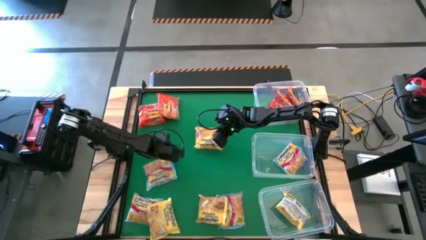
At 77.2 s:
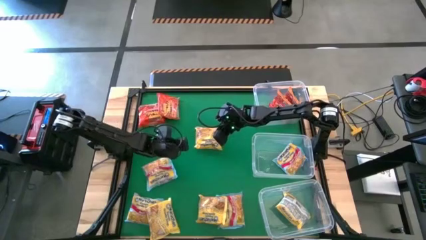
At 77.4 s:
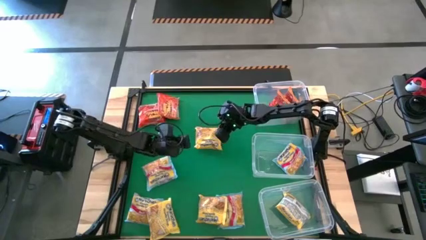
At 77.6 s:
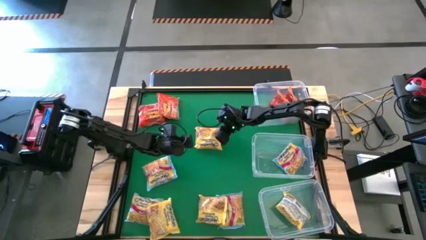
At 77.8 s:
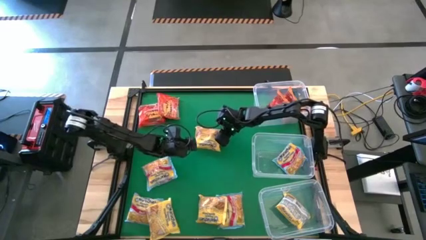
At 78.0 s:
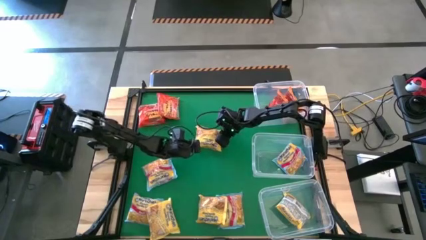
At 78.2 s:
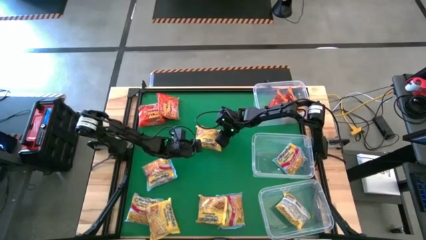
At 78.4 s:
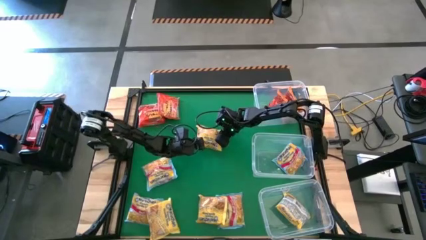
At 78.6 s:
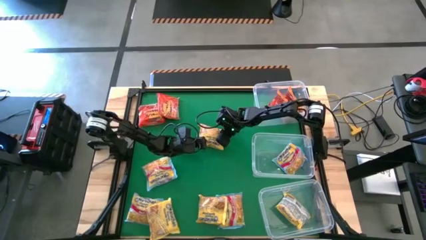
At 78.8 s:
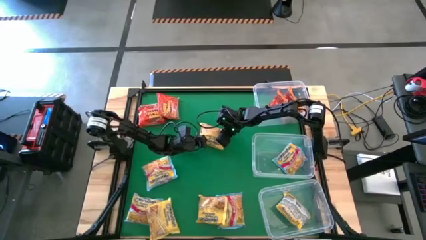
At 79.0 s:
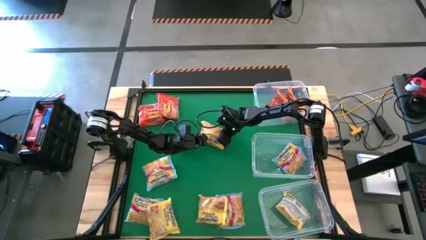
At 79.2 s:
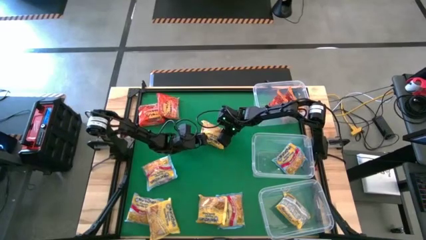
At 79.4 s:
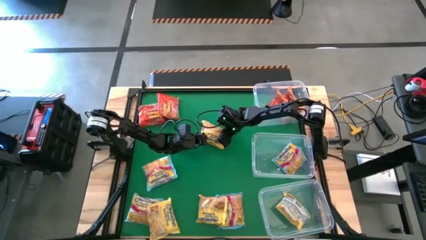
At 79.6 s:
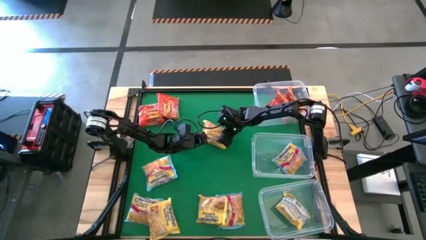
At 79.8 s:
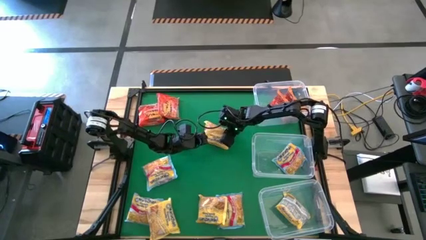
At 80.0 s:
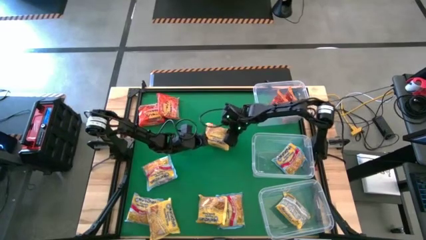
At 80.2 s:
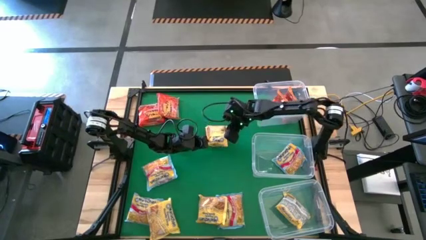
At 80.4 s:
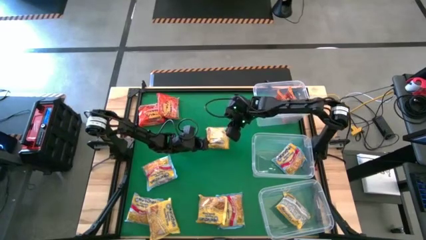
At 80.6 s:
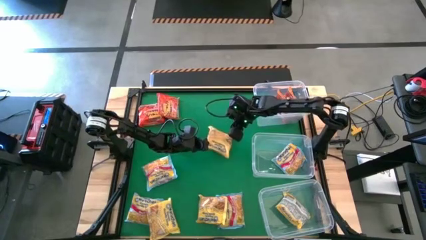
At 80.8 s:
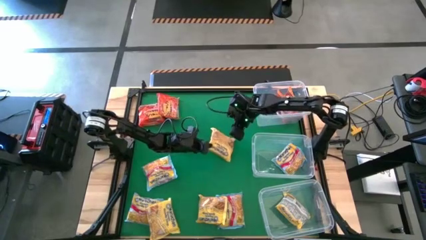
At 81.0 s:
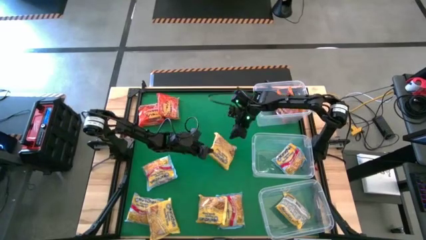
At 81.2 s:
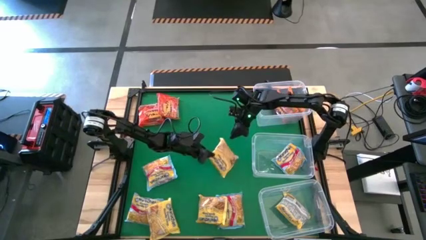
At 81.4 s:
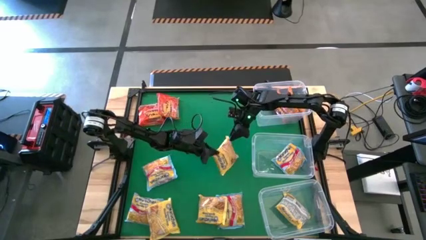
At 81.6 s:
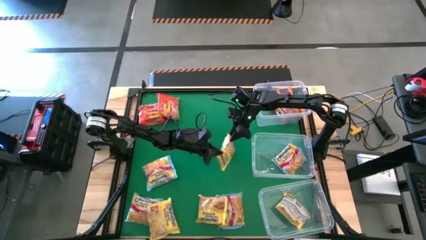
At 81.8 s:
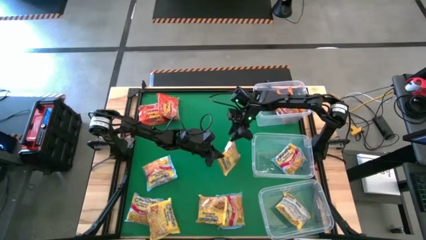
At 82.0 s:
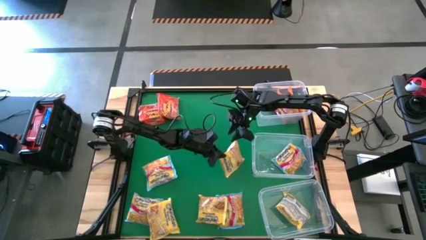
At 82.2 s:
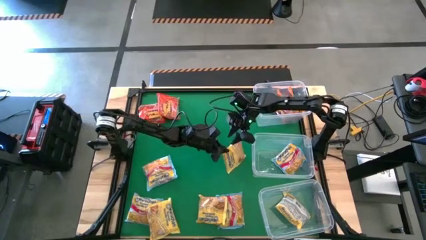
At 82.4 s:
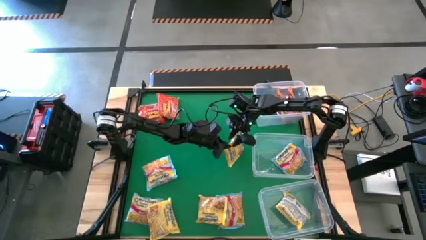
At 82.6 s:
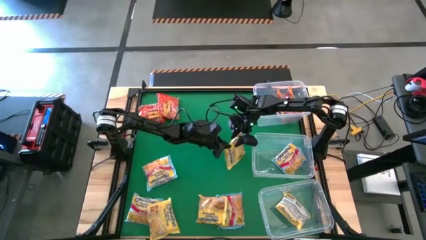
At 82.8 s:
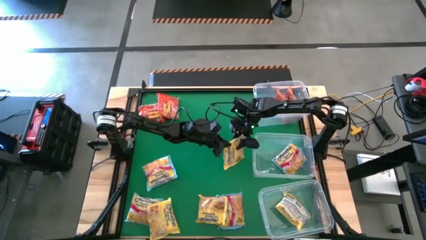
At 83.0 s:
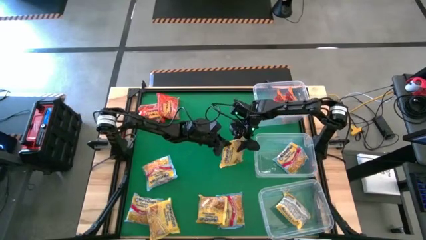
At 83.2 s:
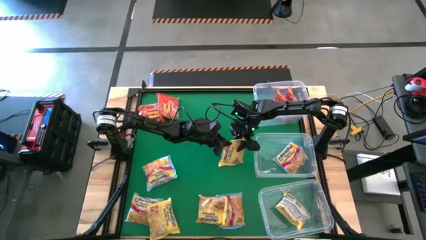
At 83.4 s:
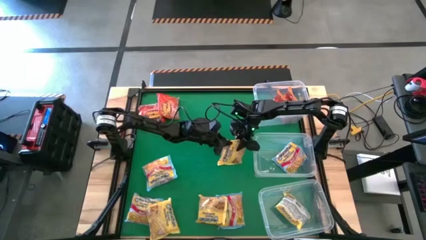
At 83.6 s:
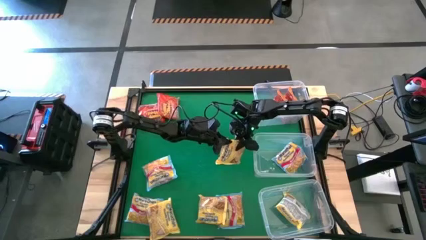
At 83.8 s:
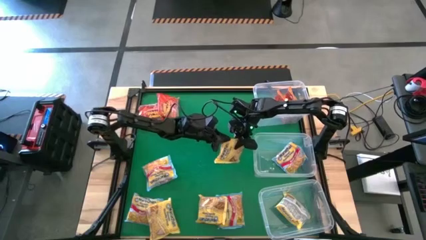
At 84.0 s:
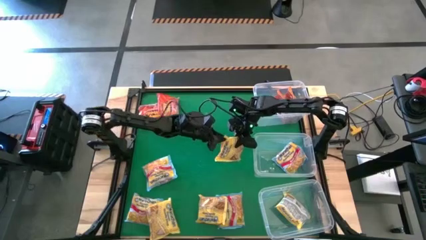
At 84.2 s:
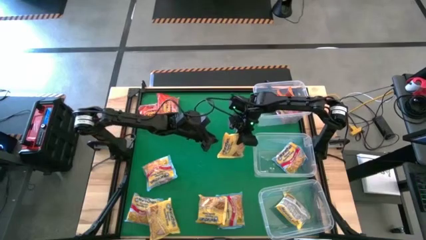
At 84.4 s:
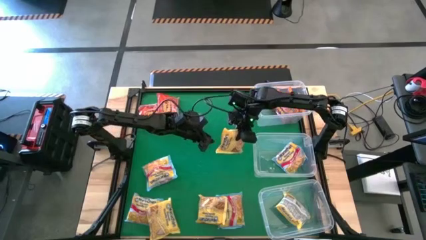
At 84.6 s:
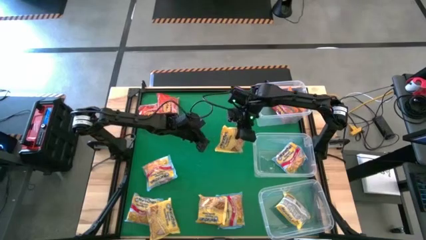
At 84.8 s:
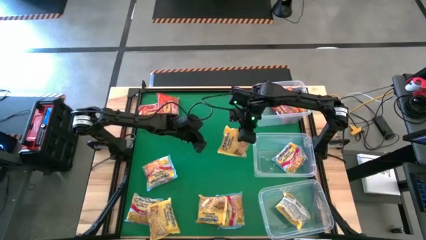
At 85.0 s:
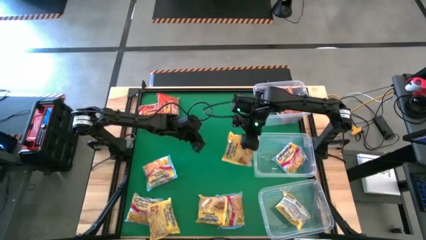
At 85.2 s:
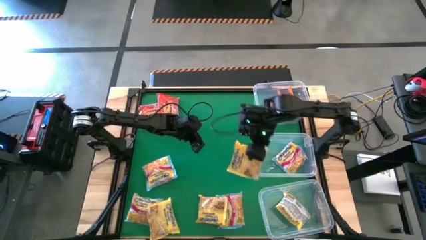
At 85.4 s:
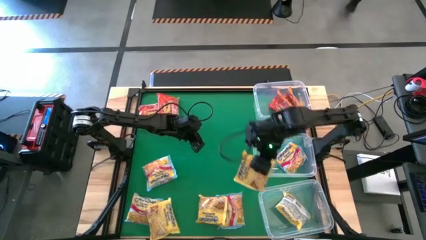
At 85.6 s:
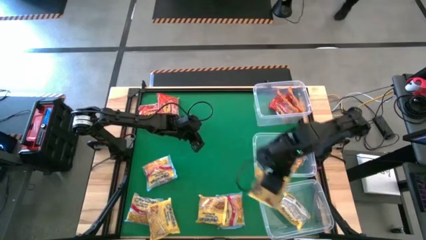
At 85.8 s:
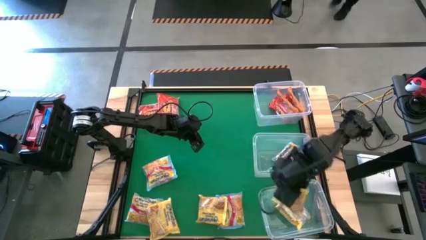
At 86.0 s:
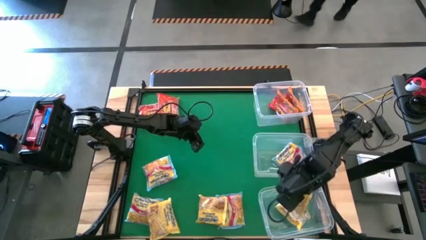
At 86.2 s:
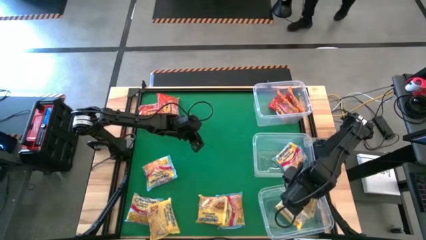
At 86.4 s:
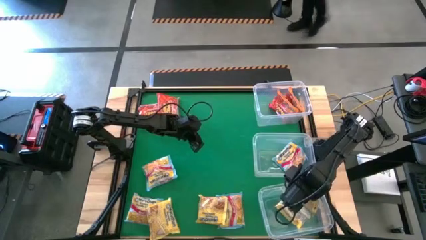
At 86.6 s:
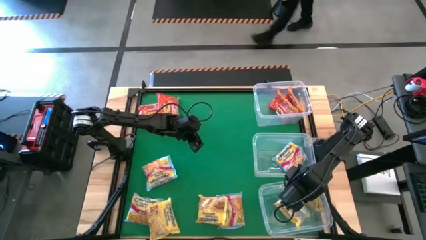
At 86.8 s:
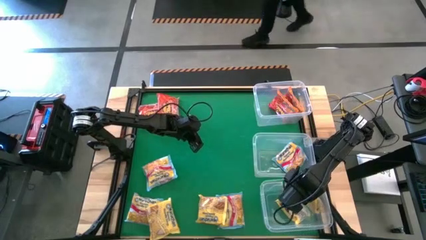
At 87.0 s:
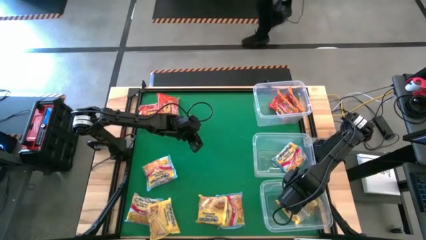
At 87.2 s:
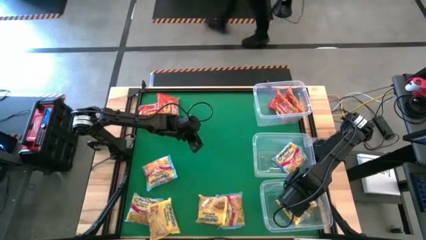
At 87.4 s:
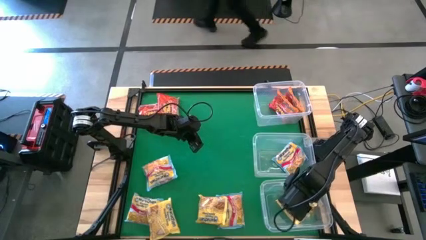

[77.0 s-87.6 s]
Task: Sort Maruchan noodles
Put the center yellow noodle pack into the bottom transparent bin

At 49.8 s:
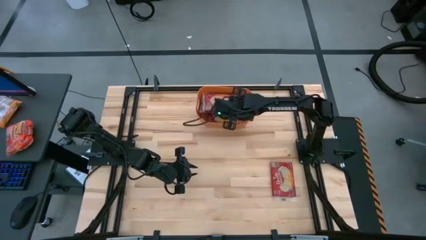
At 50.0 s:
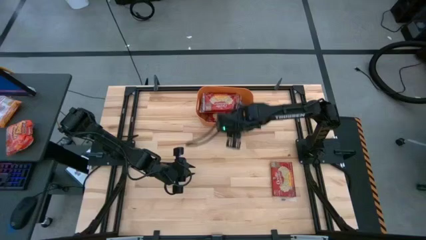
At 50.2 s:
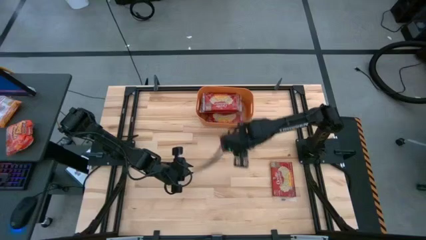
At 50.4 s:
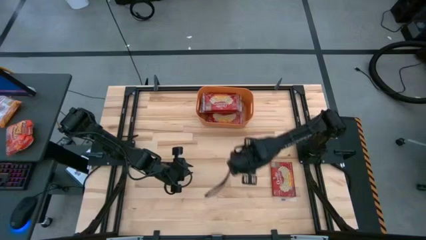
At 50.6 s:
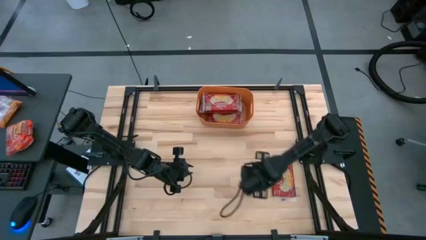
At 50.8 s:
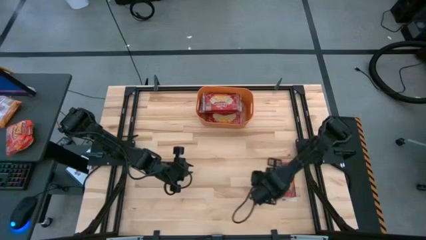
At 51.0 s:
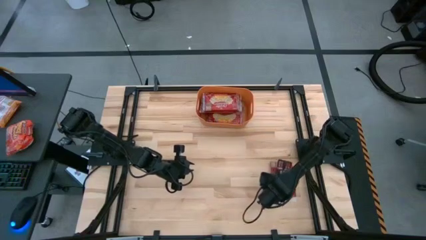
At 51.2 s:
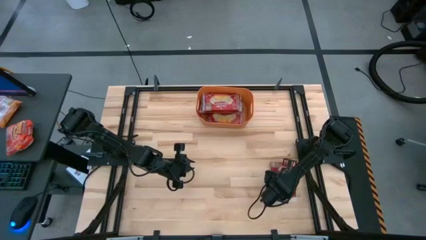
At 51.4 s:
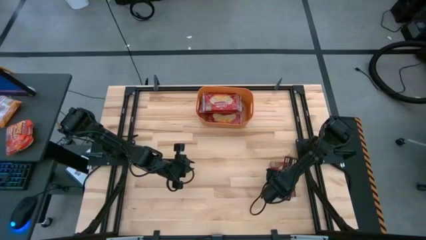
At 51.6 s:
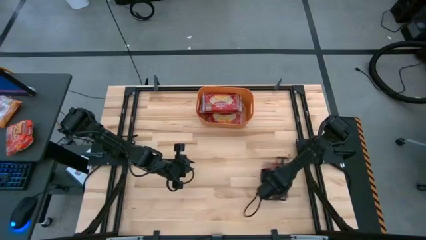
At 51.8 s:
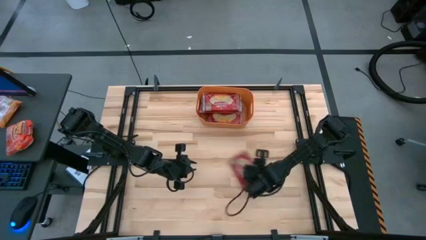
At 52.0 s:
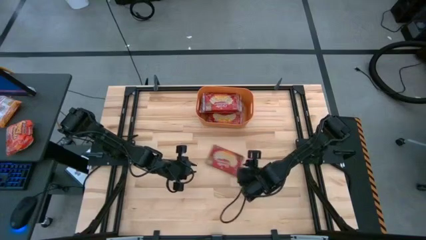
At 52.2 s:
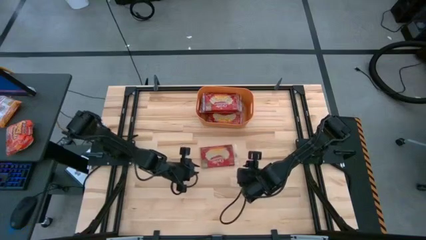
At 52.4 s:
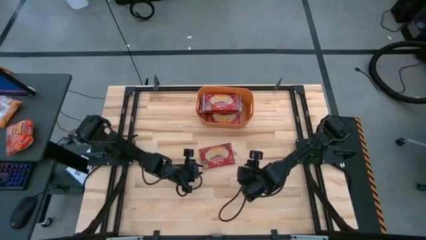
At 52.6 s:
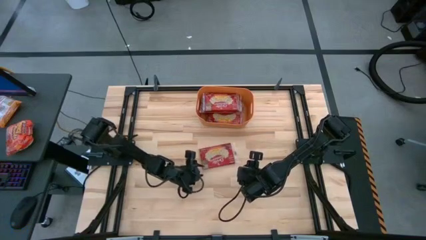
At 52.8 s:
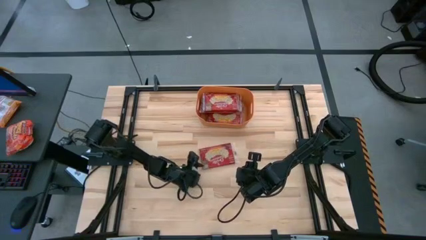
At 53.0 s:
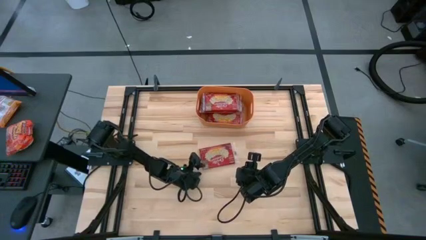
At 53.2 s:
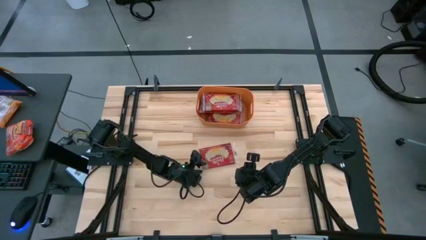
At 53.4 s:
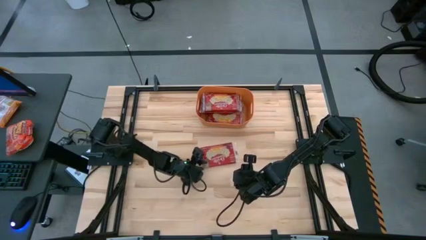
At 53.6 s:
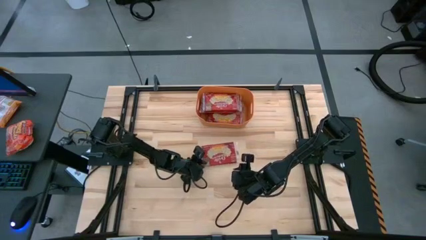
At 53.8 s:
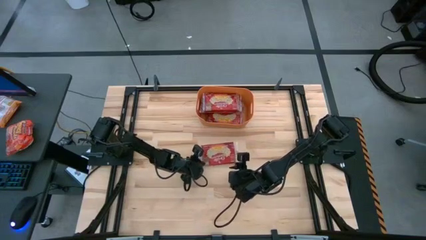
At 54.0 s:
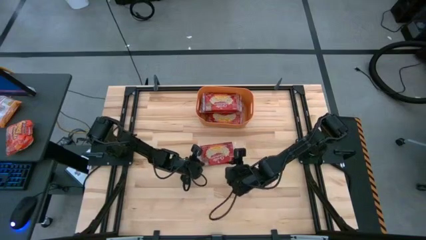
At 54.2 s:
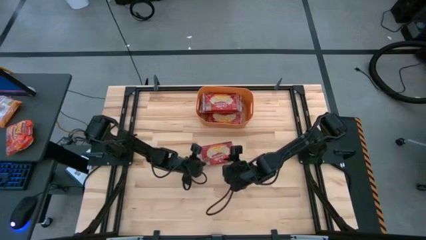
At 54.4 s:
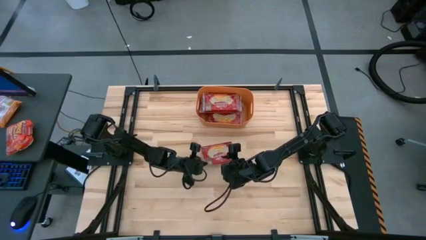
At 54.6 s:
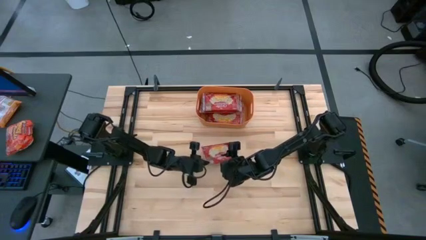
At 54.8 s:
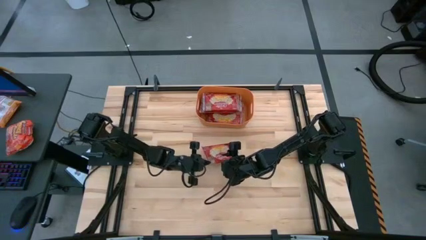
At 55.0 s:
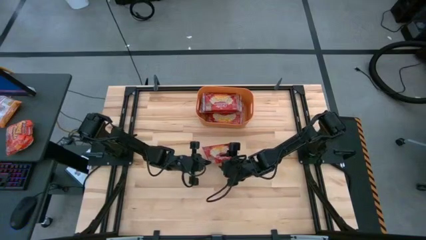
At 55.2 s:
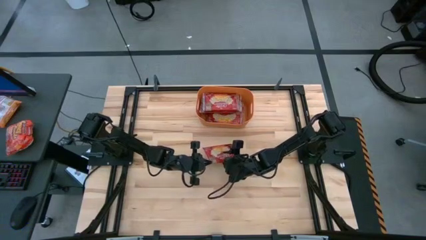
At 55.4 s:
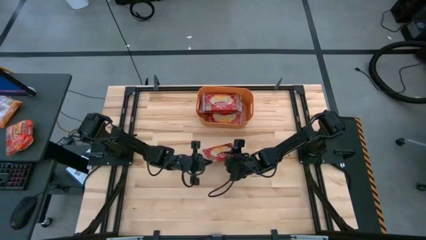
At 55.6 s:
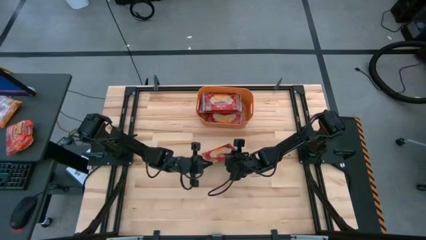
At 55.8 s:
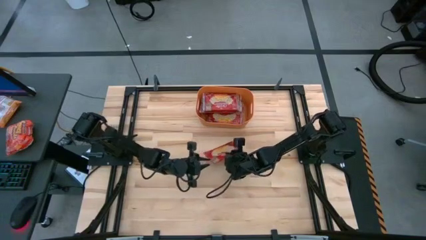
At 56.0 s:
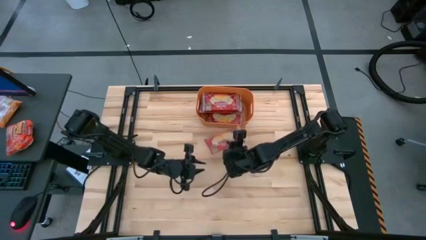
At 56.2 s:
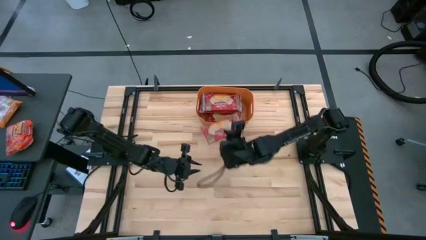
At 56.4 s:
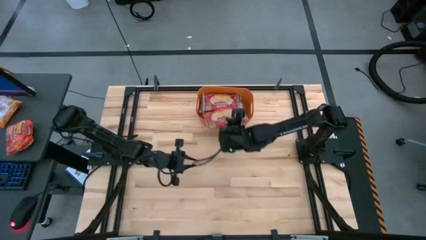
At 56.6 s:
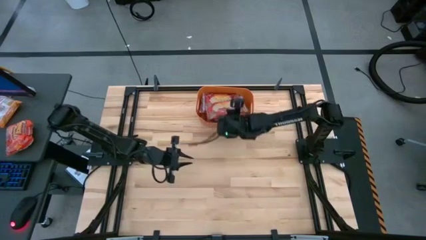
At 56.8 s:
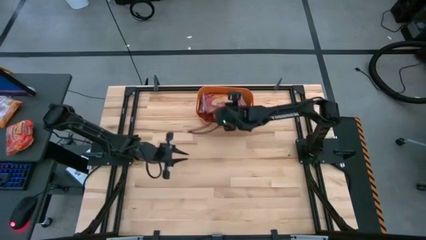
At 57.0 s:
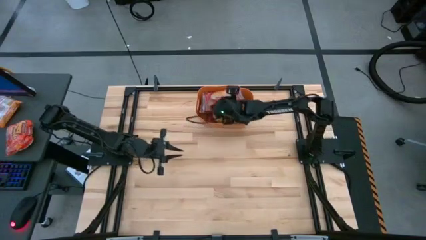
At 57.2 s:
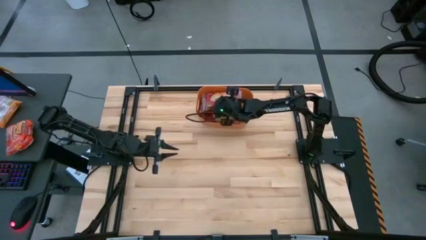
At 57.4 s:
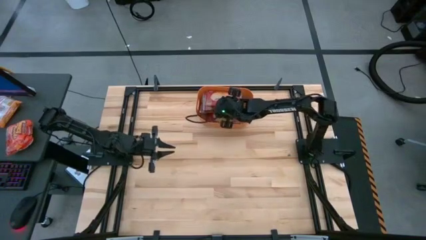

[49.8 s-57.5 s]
Task: Sort popcorn bags into baskets
Put the red popcorn bag into the orange bin
